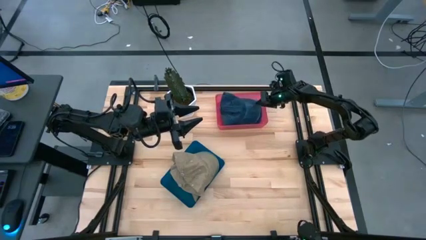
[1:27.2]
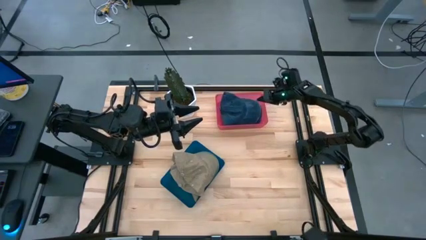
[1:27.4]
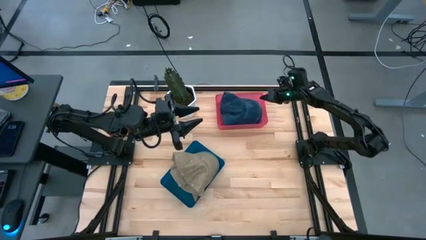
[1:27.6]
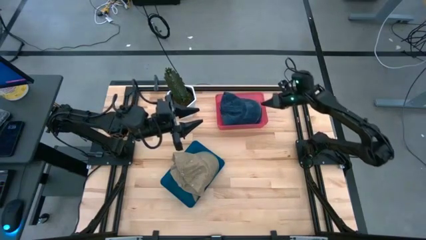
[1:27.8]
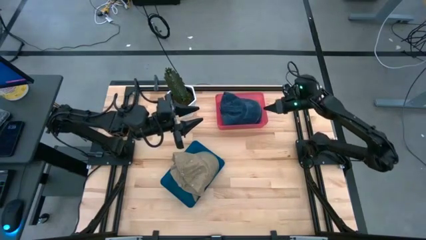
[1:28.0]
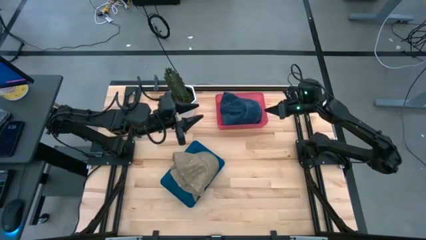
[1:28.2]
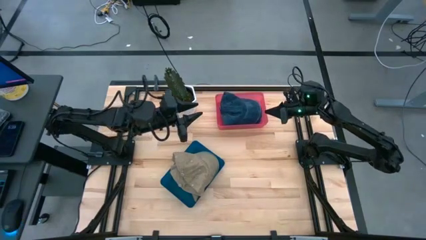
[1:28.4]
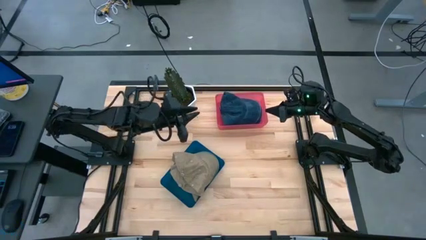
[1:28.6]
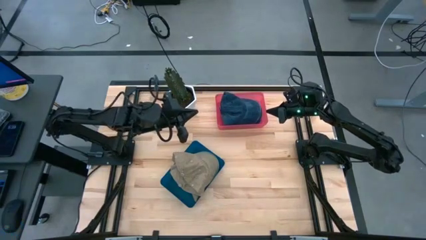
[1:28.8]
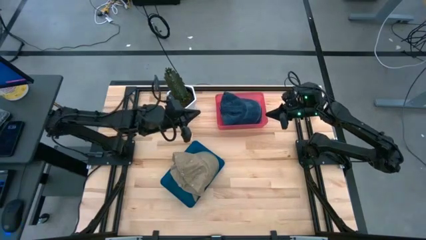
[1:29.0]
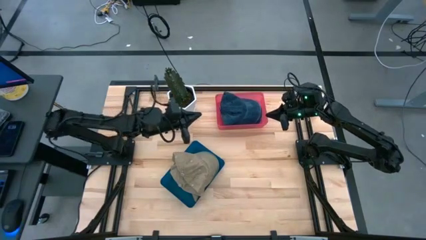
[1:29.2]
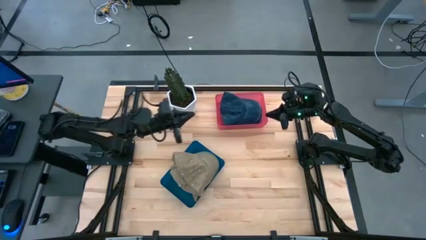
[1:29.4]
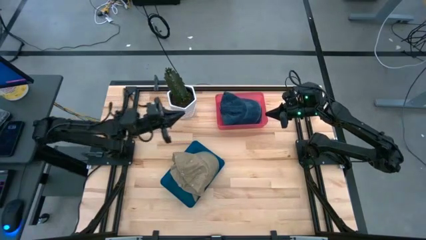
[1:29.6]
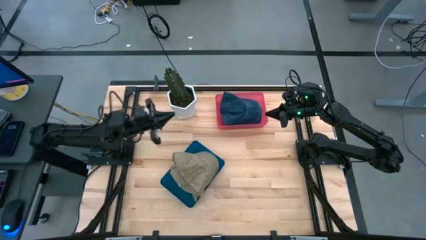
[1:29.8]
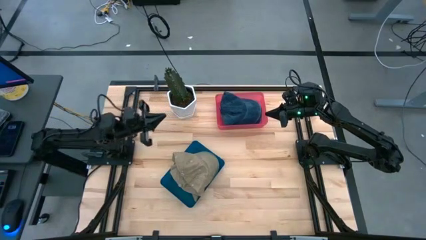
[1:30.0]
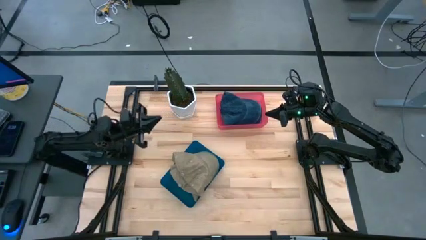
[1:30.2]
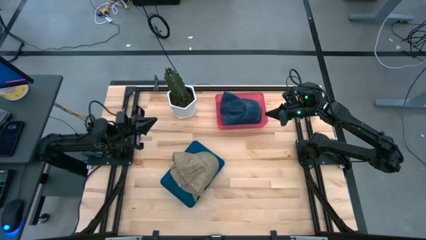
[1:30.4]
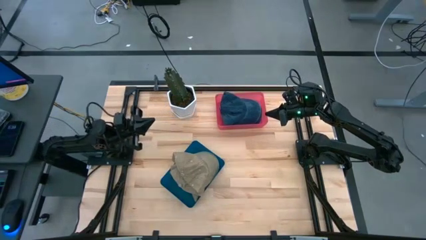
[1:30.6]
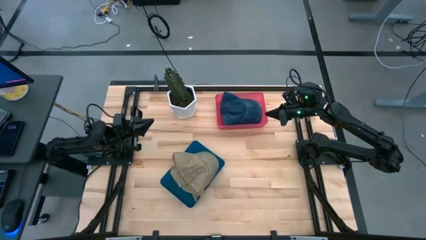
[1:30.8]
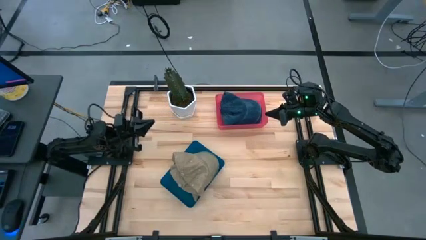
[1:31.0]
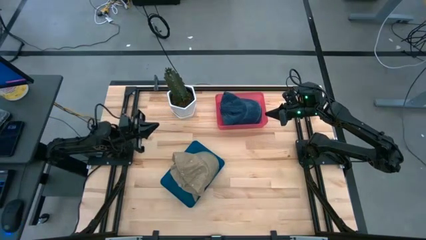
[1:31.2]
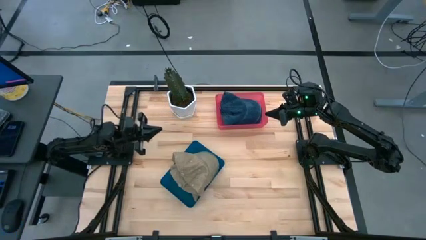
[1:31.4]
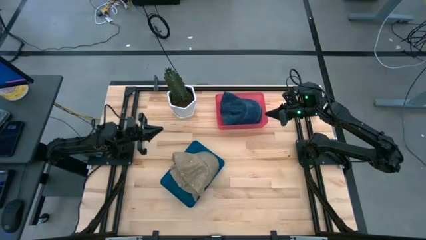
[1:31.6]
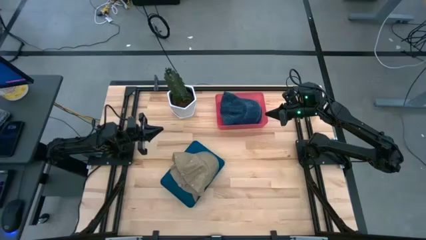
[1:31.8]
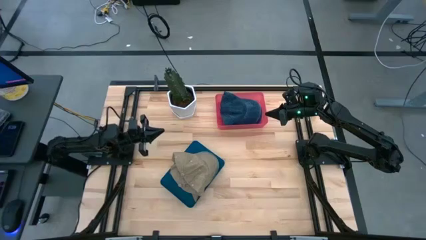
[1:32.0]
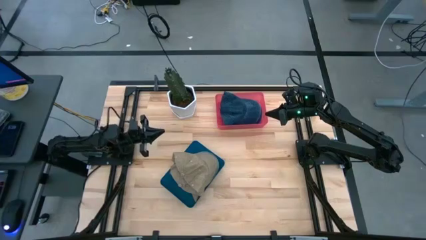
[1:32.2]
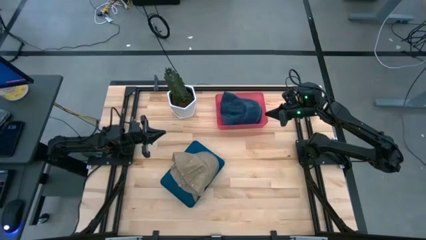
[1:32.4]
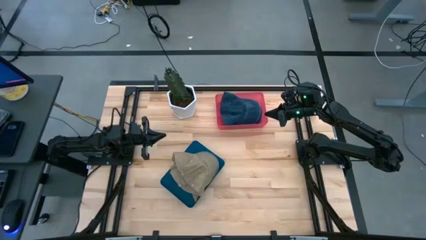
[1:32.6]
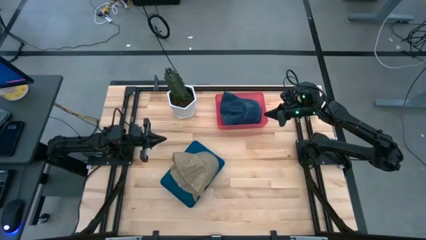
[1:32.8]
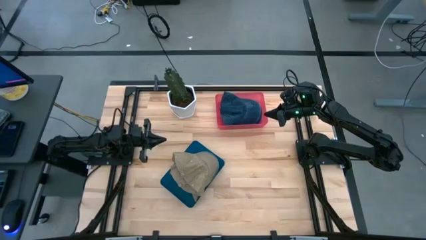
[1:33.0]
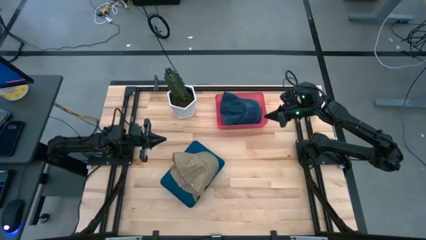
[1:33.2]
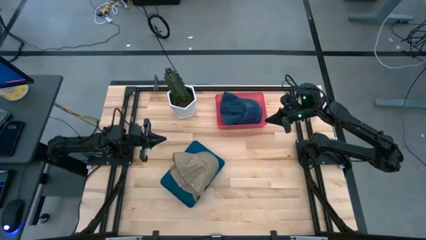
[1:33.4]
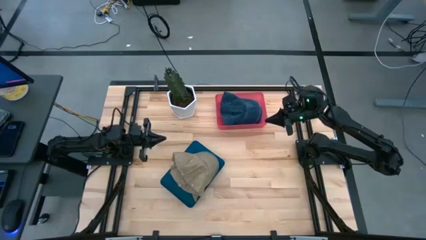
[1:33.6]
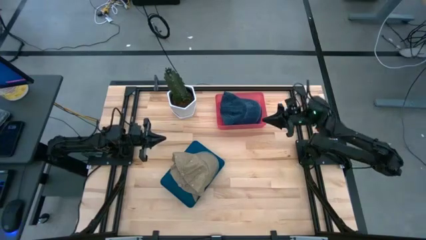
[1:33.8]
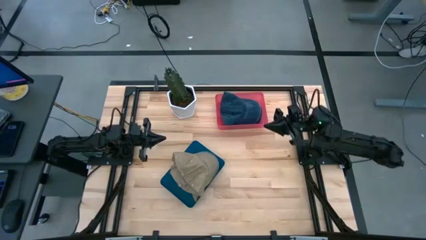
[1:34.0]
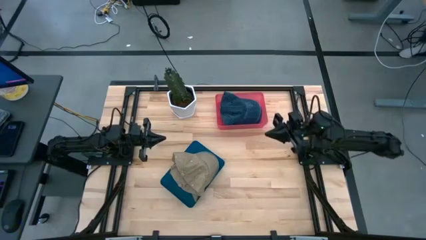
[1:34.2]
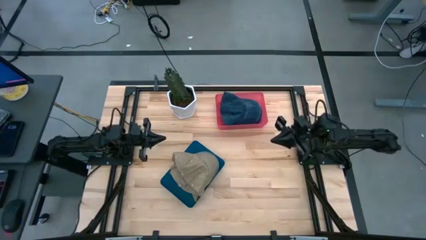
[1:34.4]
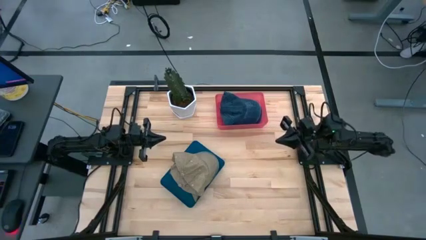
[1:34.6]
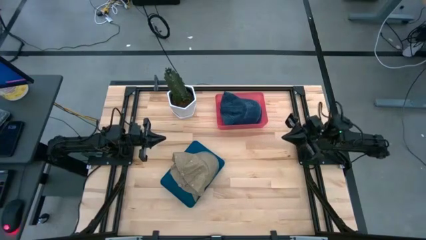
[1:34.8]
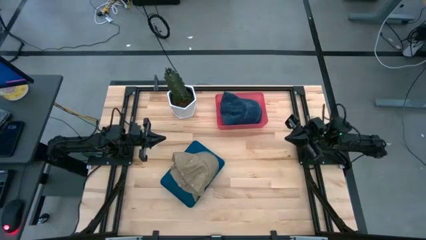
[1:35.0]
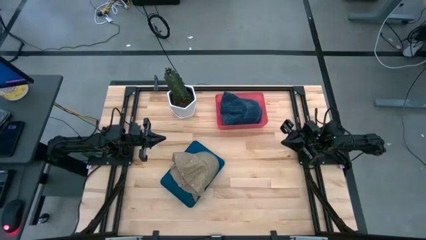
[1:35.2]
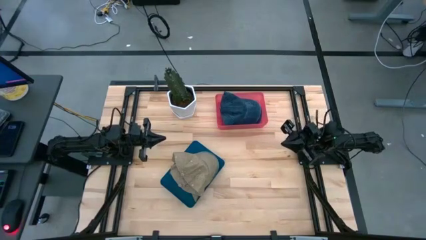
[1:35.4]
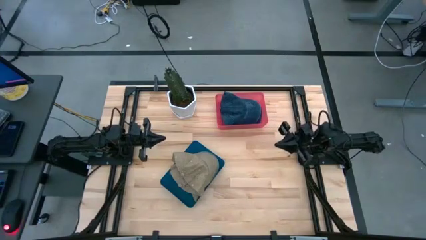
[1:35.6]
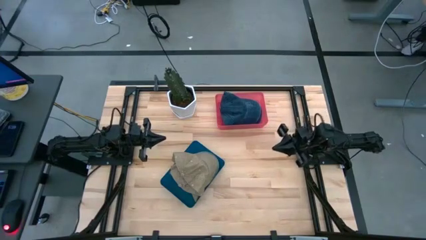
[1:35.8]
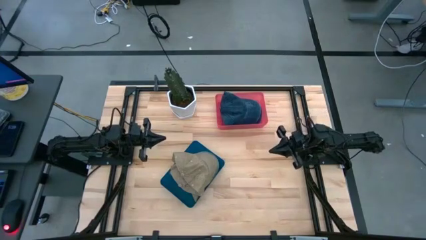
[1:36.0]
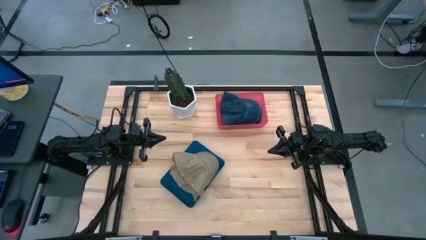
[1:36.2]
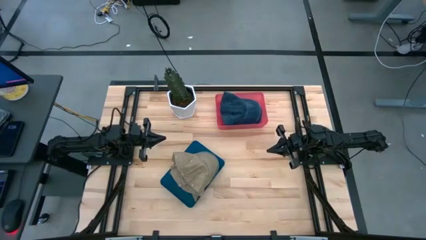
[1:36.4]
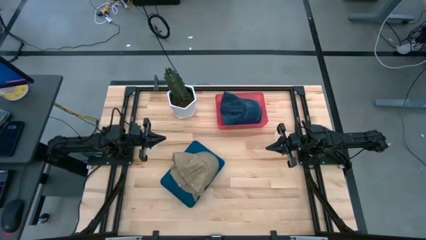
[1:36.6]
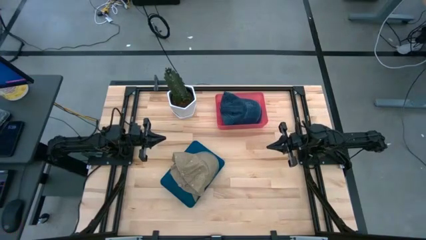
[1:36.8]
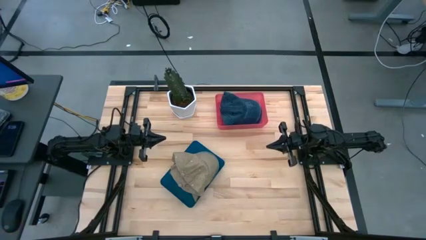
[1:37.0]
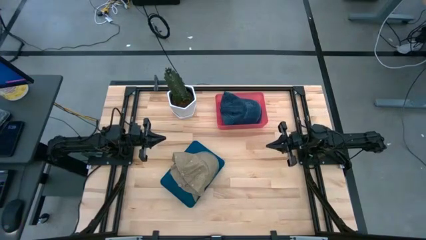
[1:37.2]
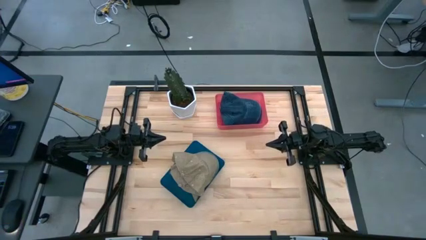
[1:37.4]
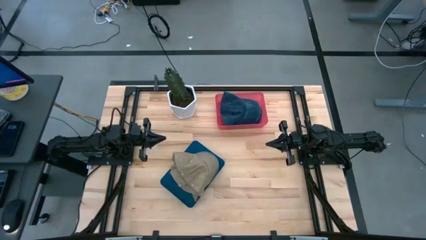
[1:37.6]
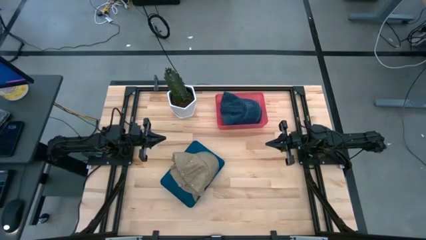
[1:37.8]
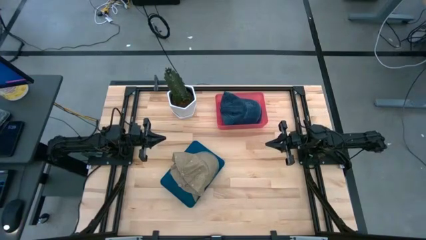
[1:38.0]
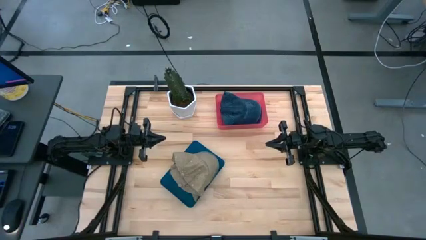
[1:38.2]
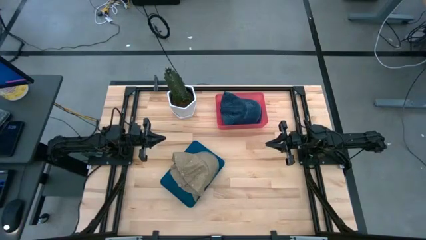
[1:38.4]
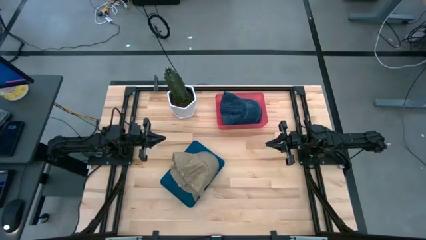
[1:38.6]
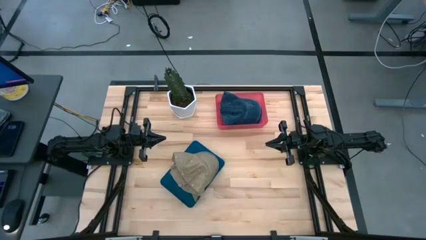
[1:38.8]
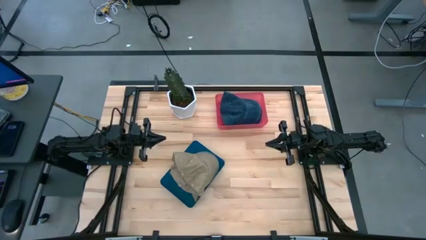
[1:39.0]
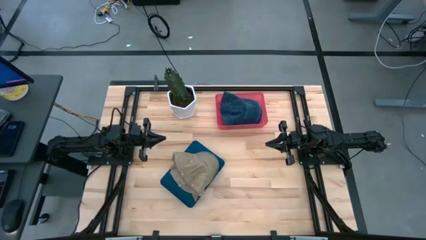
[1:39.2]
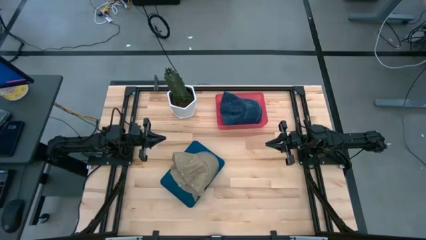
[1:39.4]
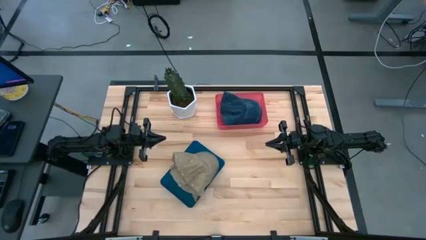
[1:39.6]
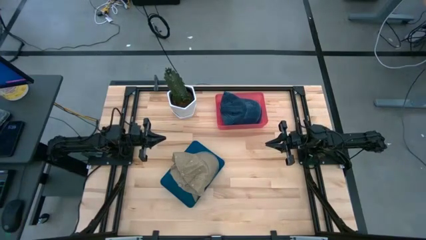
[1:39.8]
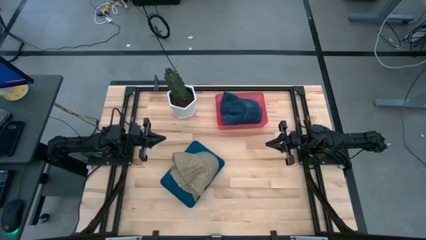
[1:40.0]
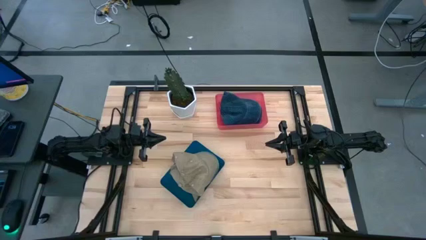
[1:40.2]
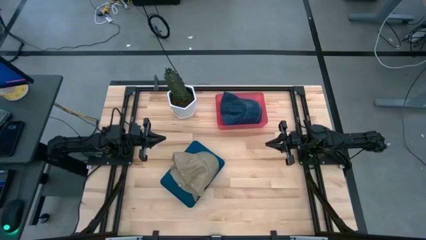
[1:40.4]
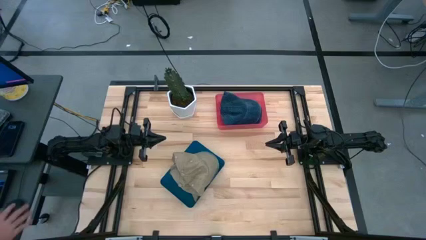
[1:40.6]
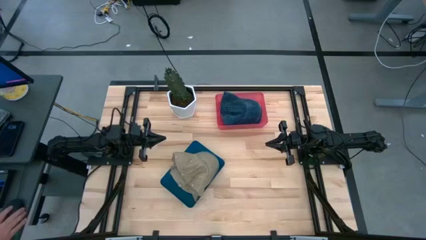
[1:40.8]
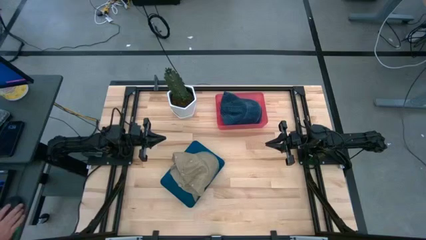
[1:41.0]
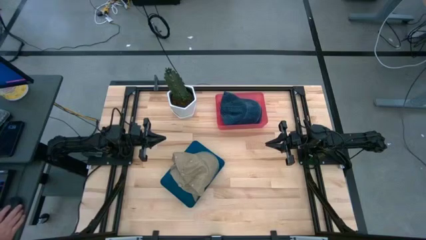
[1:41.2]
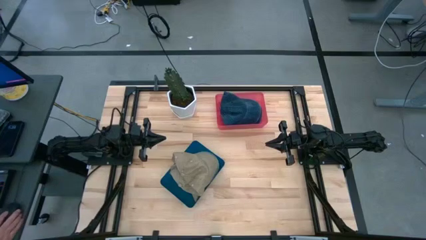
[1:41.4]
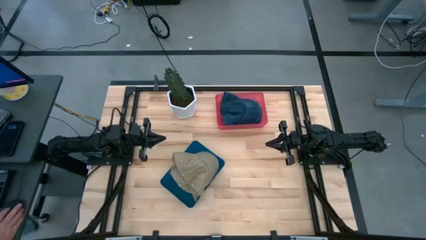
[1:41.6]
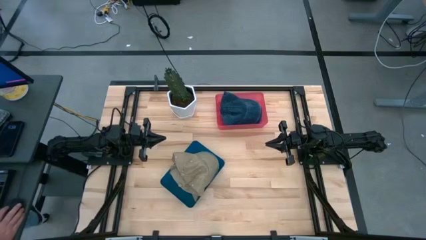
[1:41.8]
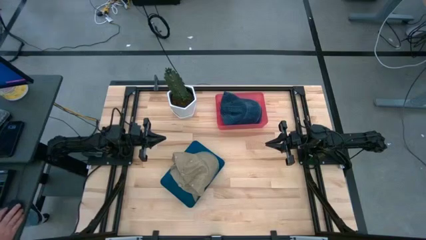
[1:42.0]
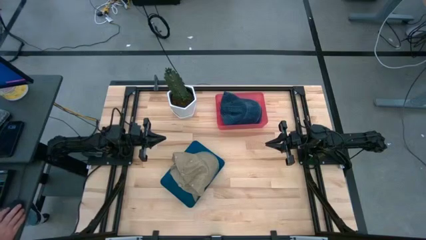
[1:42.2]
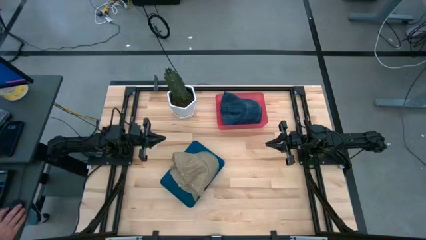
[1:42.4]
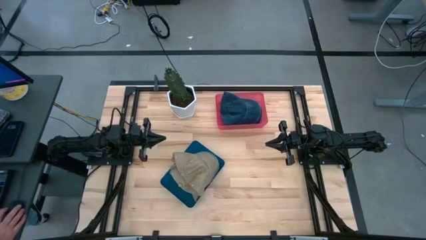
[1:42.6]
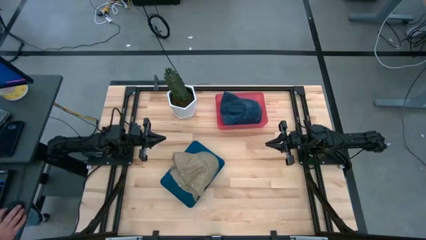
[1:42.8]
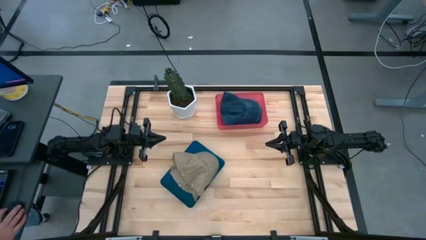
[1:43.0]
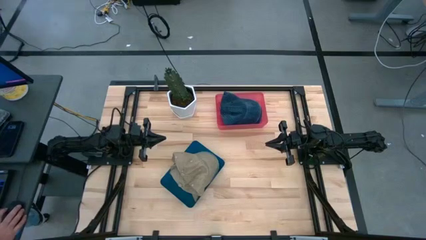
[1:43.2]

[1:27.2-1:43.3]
Task: Pick & Place hat
Return to Home Position
